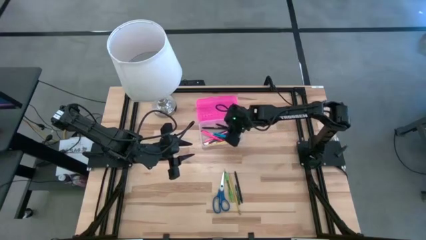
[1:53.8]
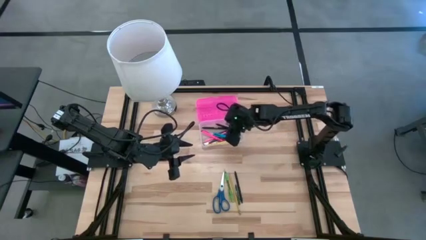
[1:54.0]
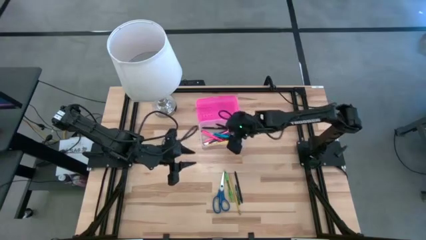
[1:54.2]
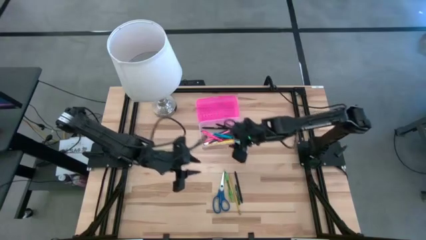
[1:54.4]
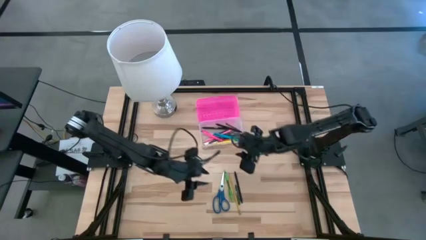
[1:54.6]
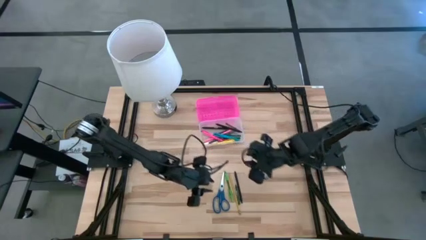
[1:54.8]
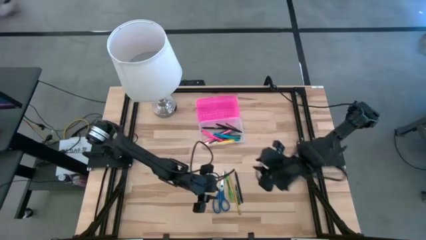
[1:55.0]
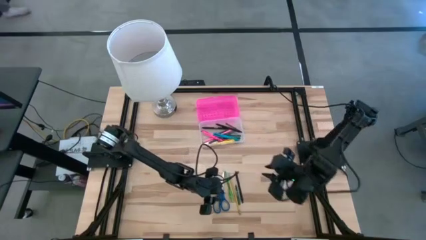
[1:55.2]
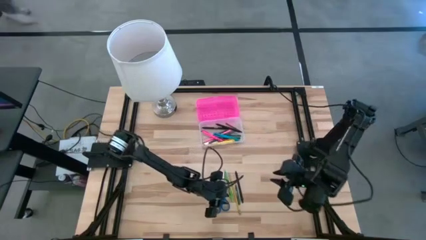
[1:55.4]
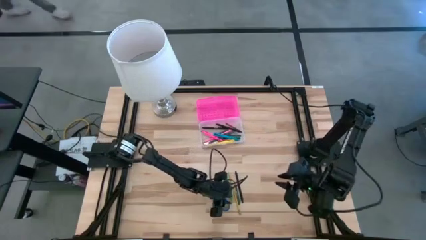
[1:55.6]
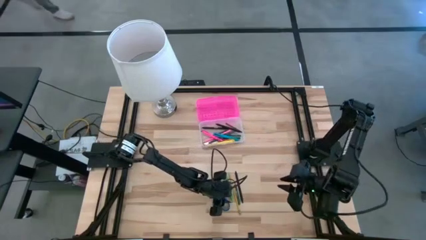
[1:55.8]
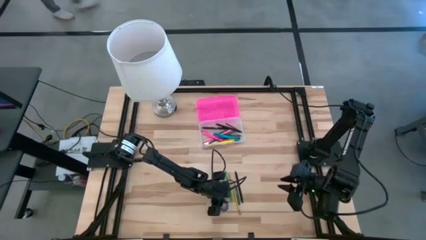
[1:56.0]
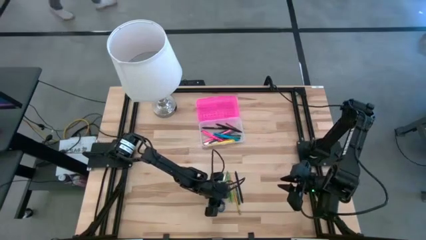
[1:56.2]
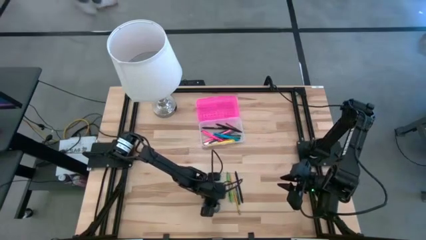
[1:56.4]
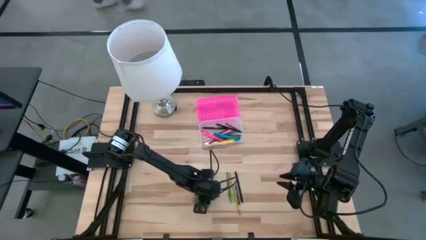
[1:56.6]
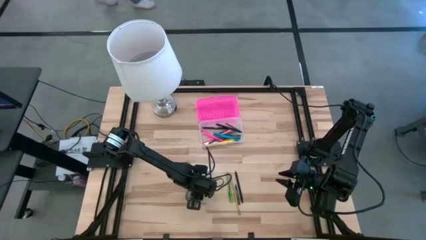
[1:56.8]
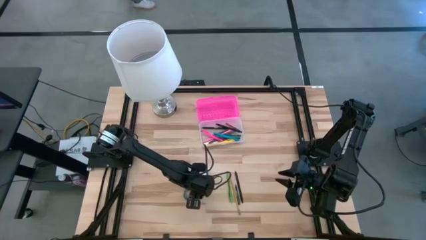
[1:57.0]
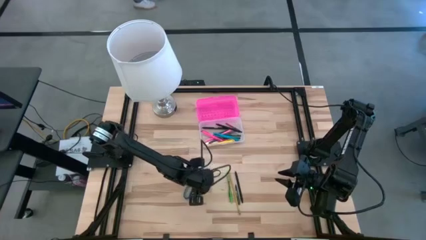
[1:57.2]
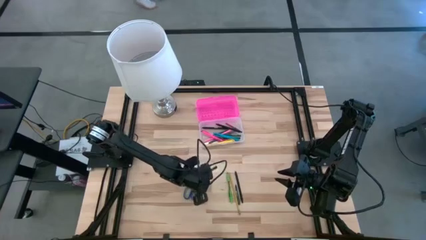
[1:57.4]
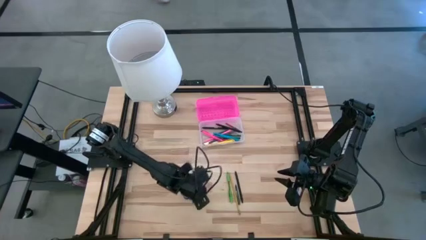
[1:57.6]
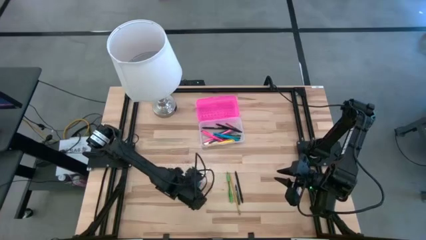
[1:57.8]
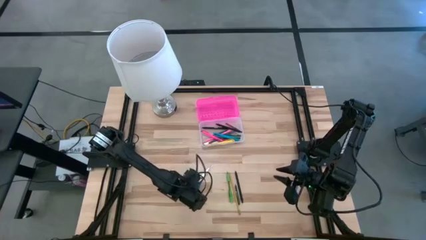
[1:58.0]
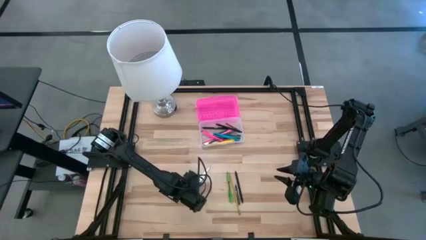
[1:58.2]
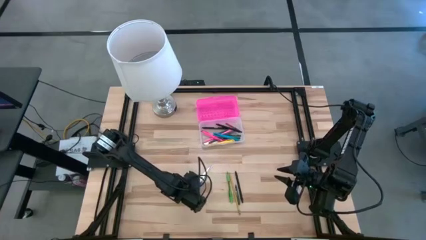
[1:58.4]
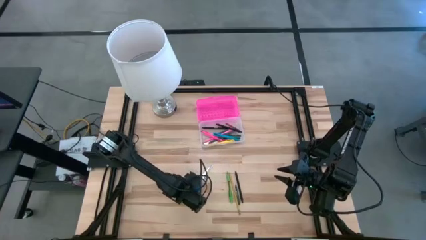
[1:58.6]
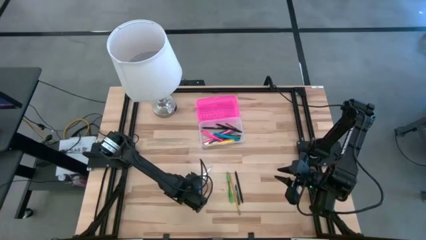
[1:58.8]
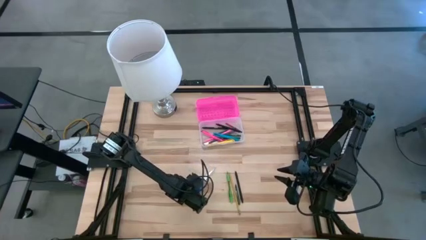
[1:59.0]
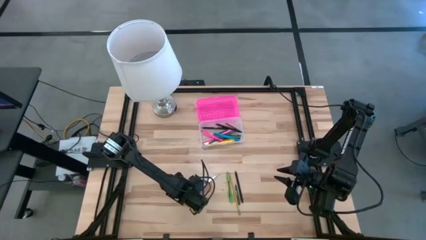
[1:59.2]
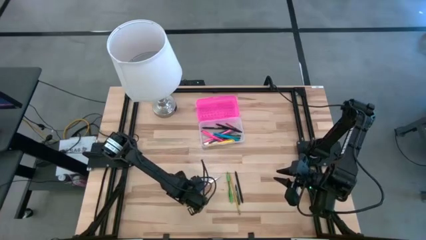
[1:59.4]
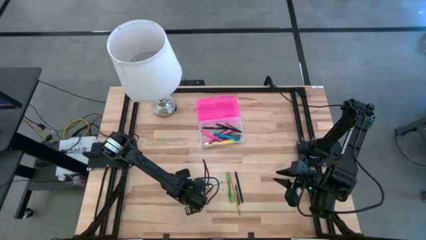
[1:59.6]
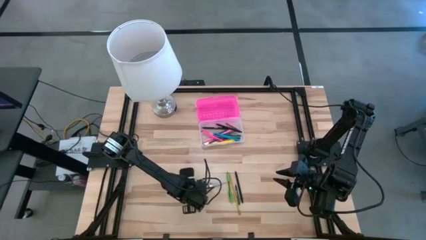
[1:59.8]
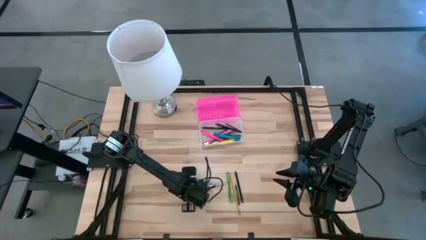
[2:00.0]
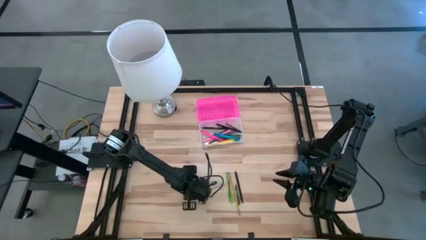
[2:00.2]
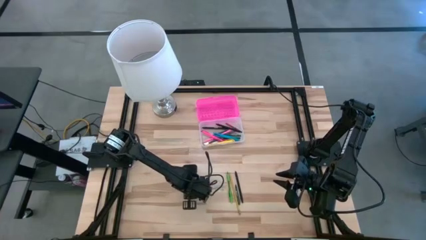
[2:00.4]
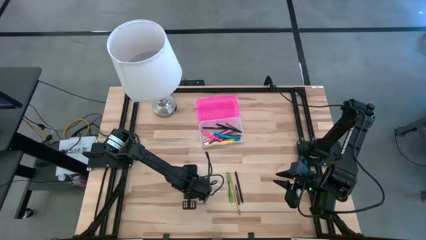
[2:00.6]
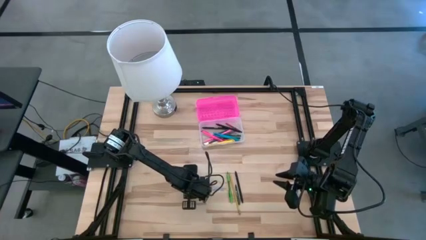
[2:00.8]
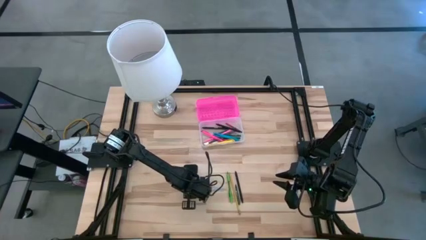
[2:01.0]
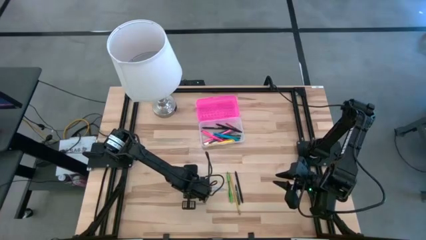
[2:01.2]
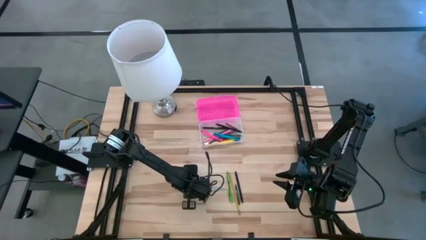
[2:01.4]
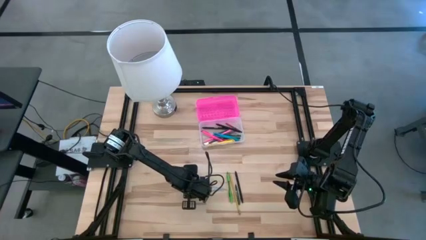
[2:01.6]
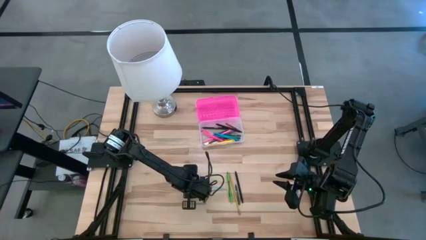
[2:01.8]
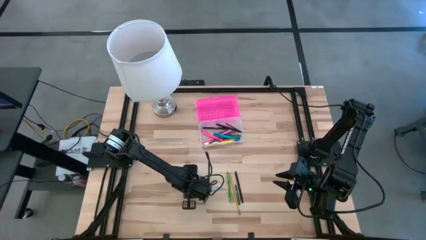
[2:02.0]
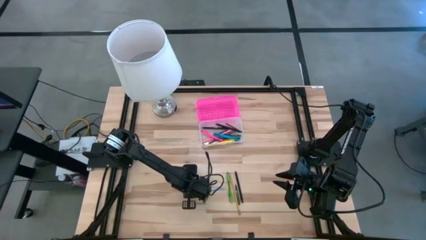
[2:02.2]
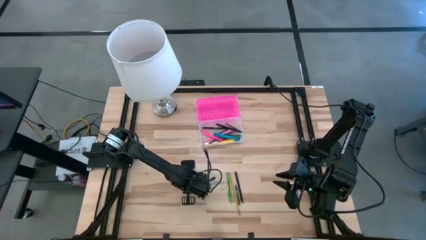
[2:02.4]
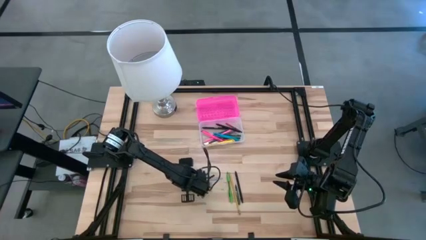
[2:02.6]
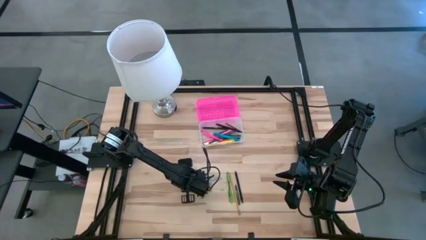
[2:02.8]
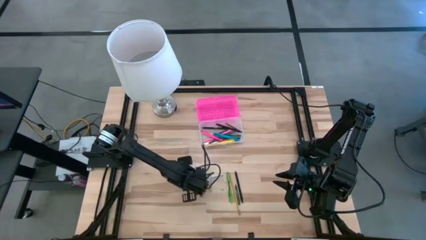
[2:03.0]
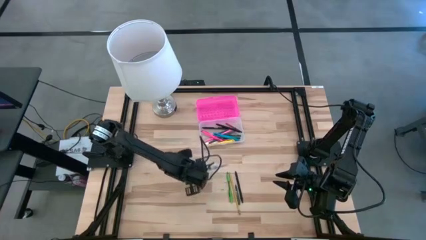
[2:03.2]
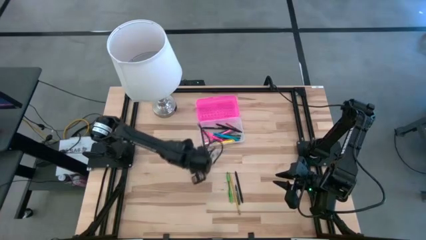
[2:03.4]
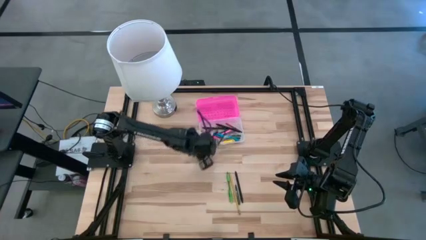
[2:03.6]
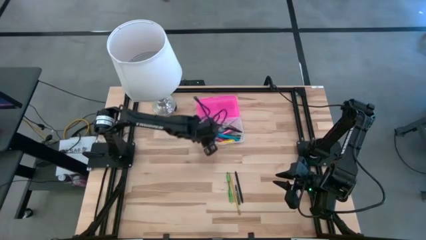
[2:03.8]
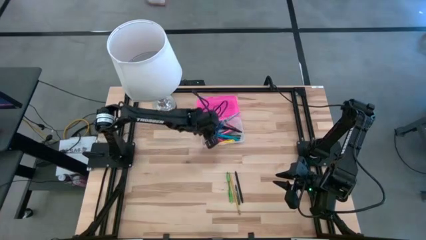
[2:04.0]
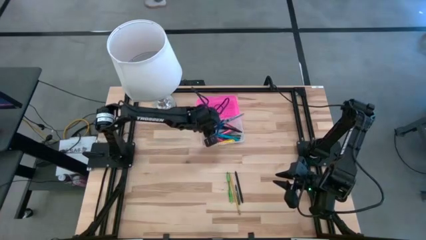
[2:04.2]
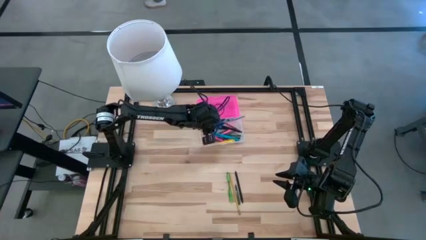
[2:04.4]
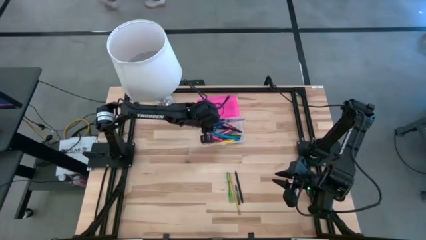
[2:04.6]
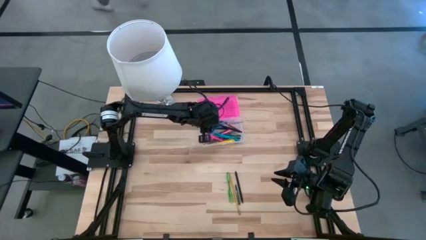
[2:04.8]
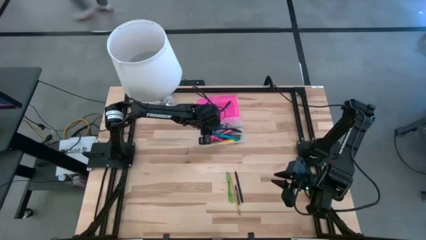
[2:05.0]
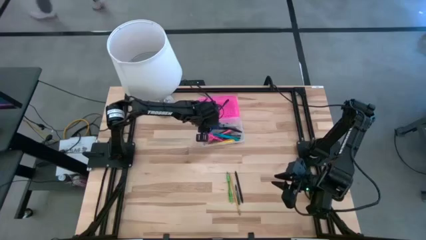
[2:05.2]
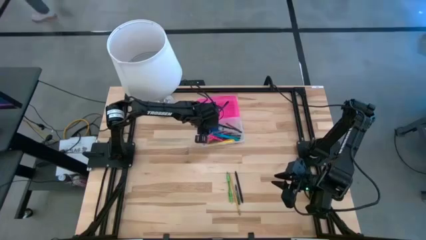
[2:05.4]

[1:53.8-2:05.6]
Task: Pick & place school supplies into a supply box
Put the blue scissors into the pink supply box

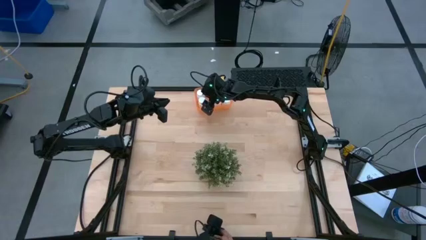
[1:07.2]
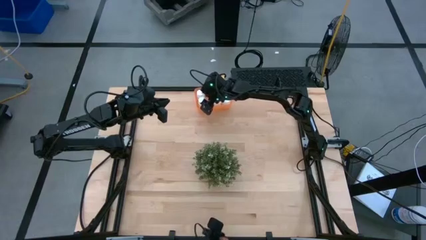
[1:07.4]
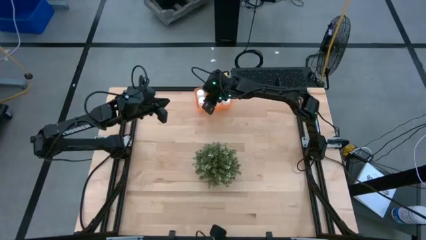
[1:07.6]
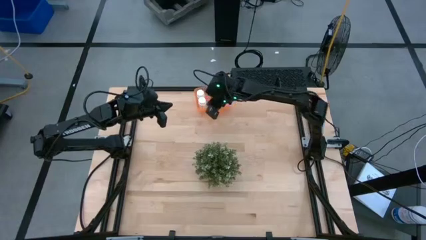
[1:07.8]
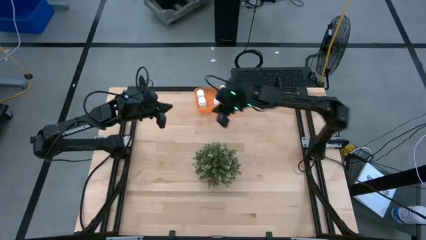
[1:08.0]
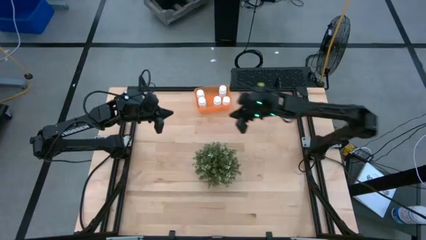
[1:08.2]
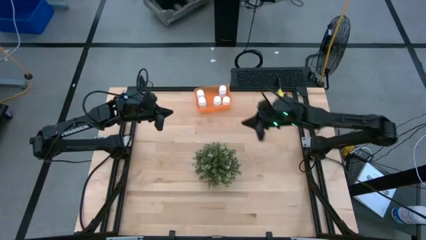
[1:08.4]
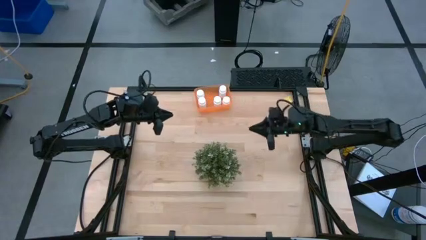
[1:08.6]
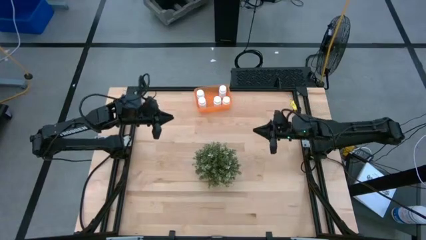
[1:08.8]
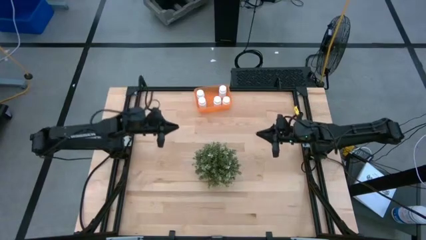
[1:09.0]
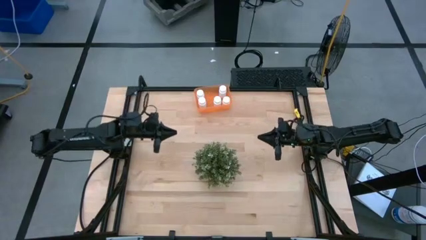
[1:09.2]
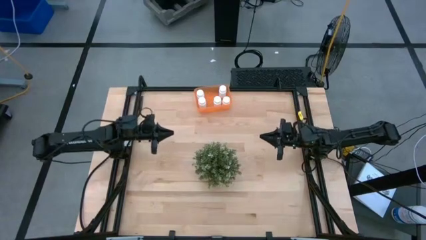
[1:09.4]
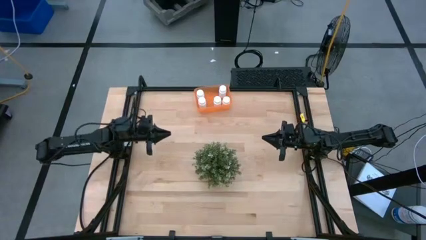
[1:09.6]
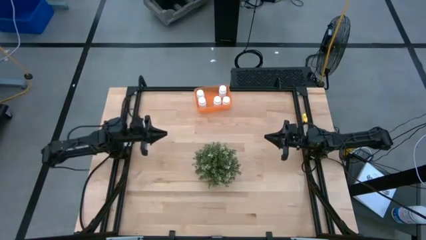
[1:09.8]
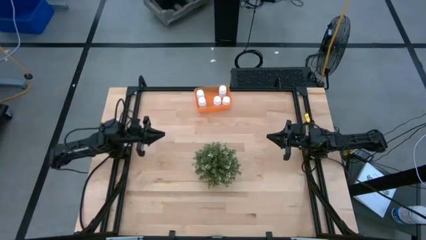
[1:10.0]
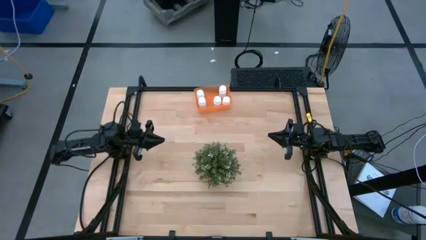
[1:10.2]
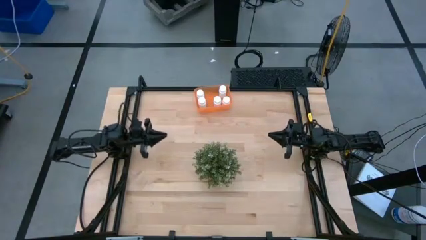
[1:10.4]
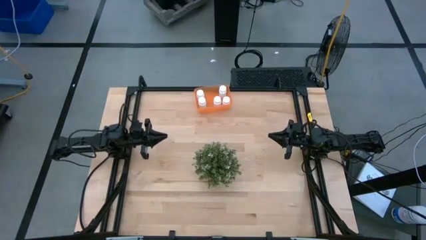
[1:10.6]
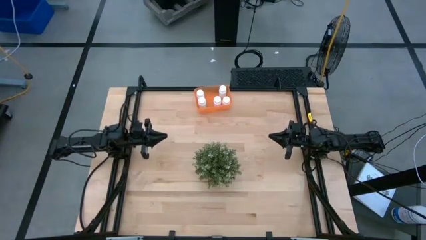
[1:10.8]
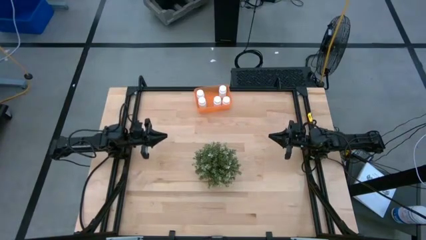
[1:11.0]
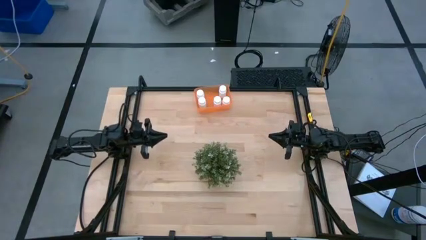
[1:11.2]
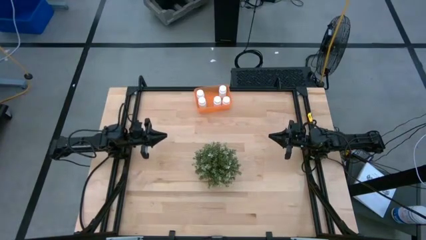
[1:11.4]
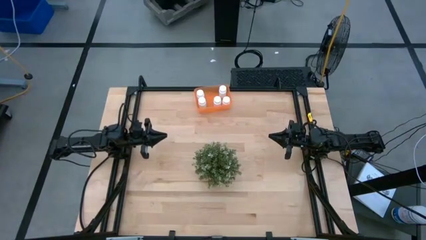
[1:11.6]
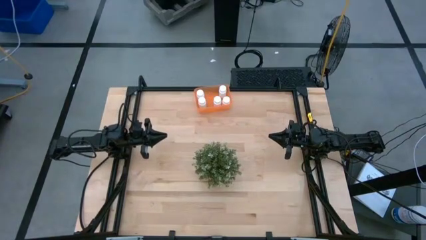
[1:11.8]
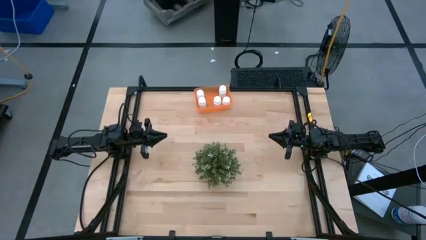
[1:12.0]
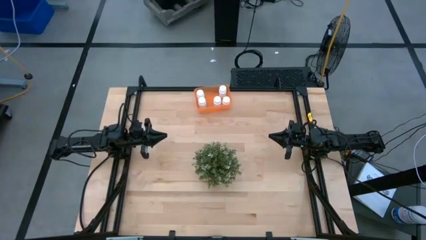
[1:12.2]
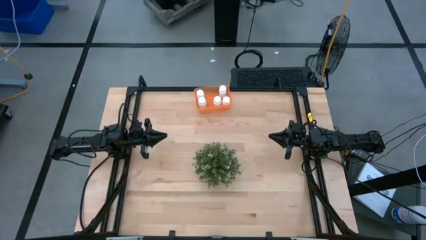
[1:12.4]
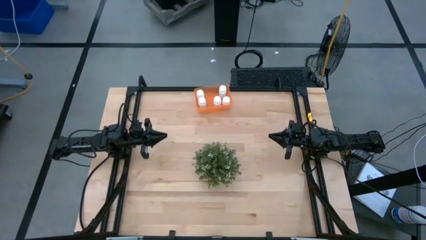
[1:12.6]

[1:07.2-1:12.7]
Task: Pick and place pill bottles into a basket
Return to Home Position
